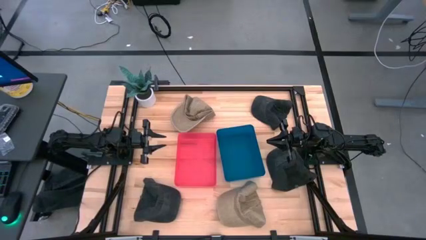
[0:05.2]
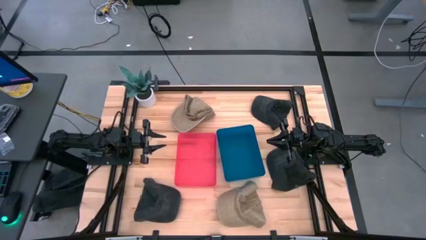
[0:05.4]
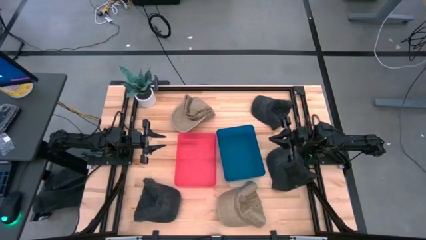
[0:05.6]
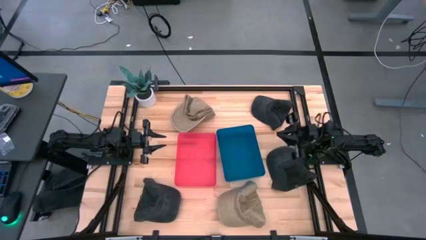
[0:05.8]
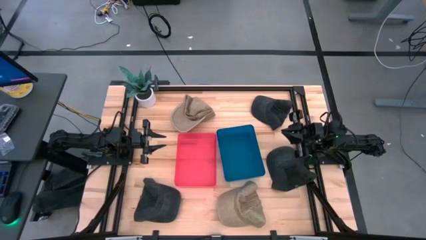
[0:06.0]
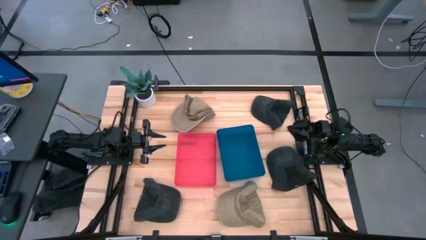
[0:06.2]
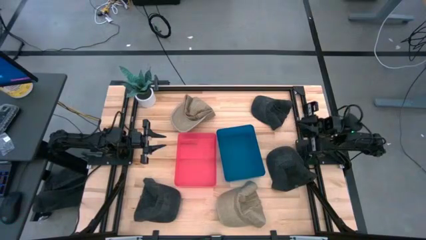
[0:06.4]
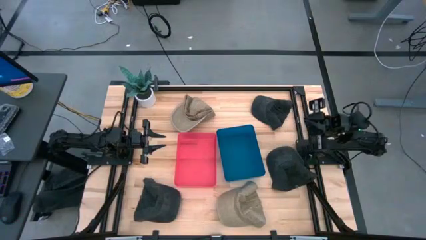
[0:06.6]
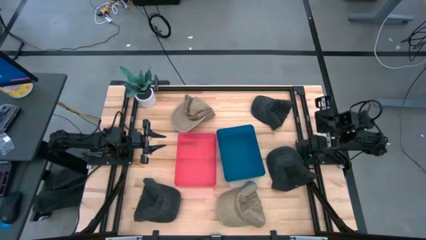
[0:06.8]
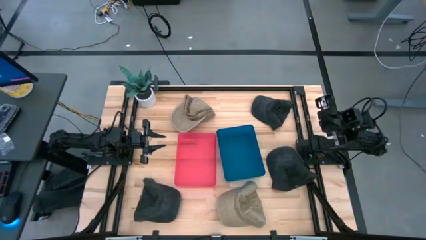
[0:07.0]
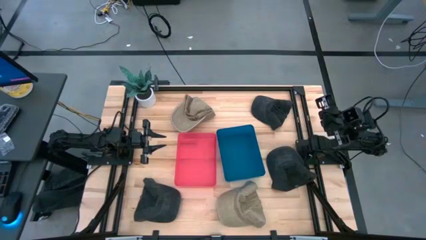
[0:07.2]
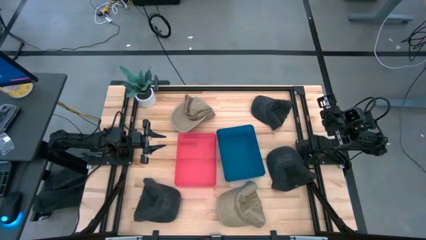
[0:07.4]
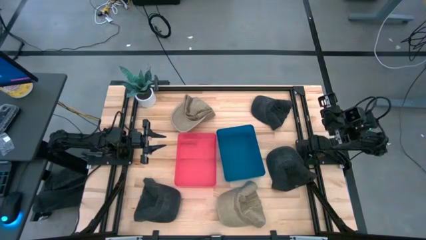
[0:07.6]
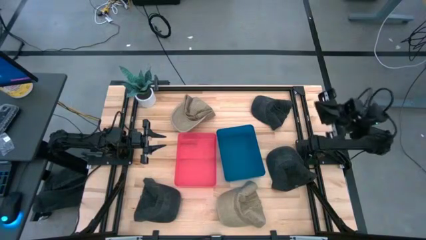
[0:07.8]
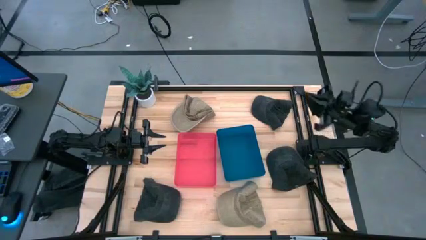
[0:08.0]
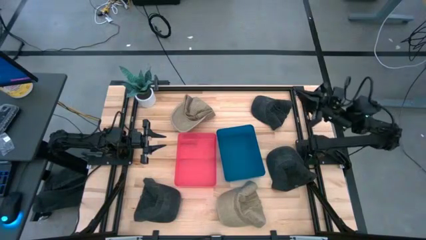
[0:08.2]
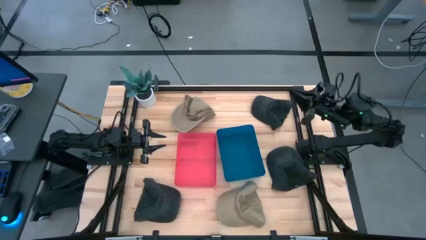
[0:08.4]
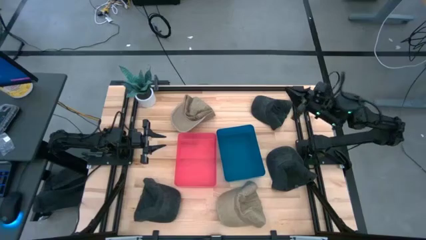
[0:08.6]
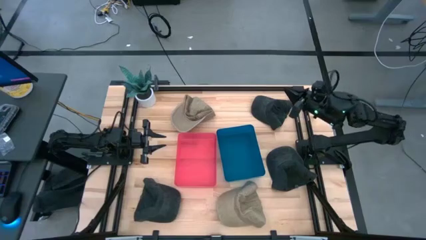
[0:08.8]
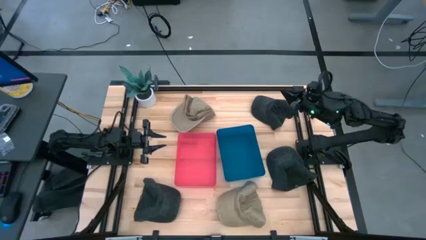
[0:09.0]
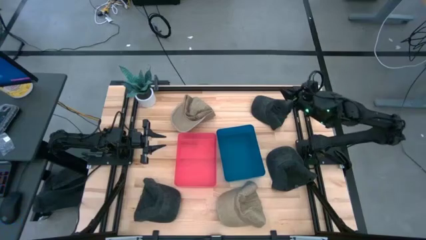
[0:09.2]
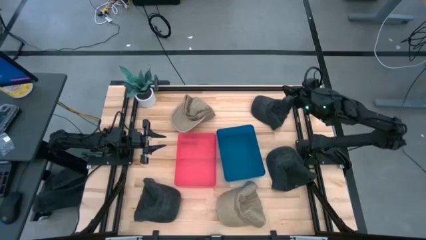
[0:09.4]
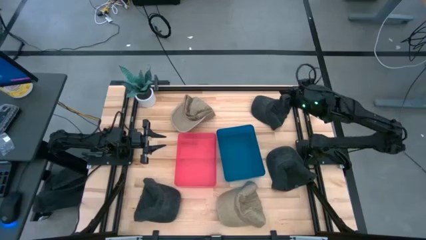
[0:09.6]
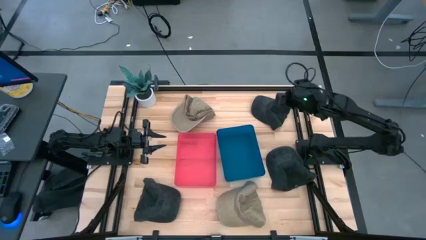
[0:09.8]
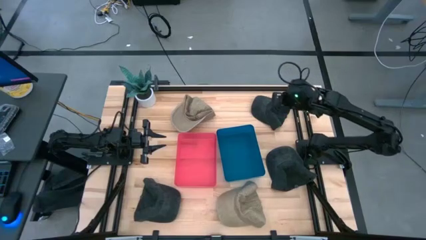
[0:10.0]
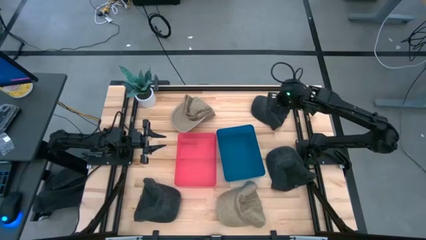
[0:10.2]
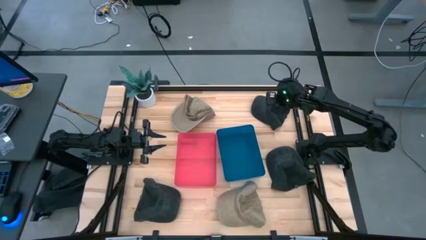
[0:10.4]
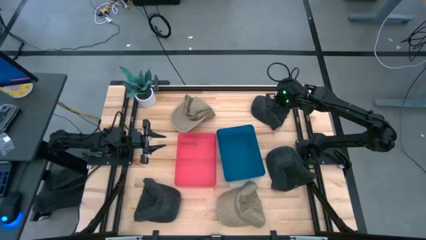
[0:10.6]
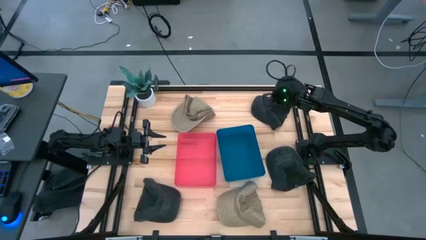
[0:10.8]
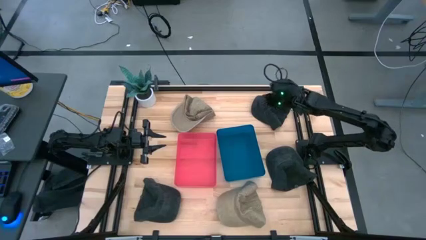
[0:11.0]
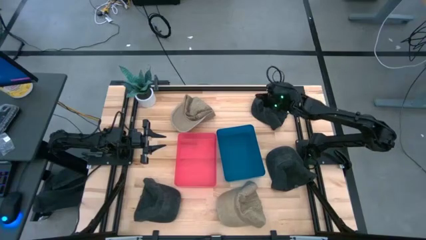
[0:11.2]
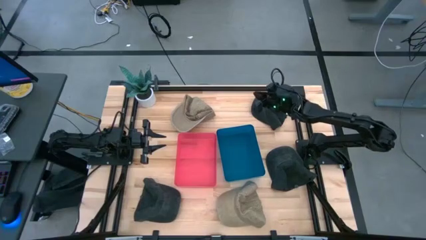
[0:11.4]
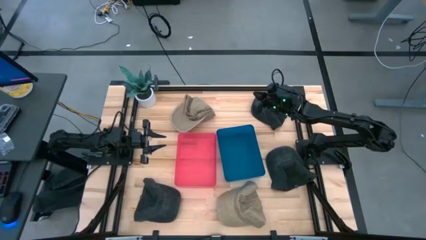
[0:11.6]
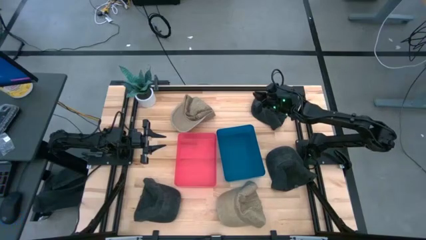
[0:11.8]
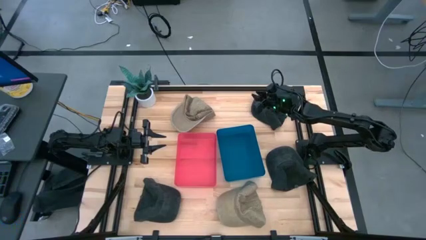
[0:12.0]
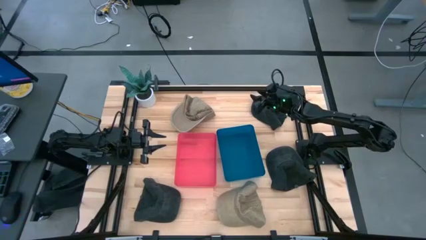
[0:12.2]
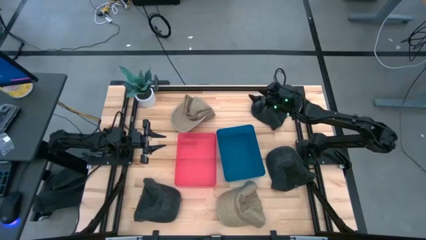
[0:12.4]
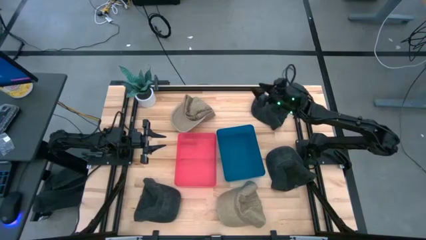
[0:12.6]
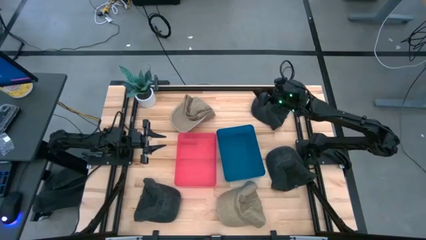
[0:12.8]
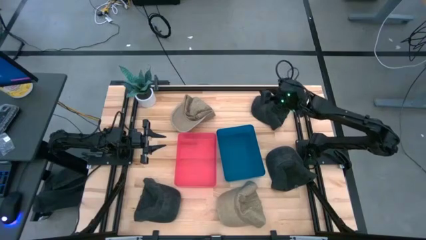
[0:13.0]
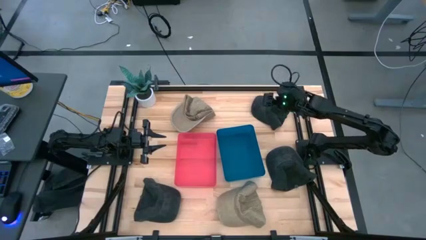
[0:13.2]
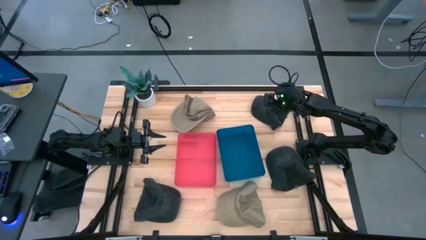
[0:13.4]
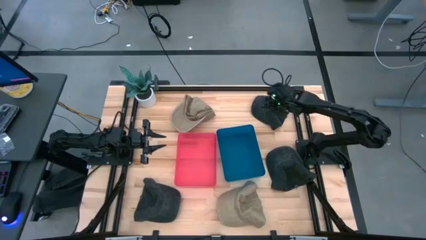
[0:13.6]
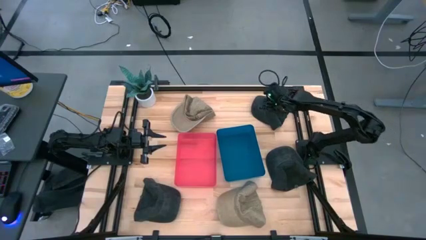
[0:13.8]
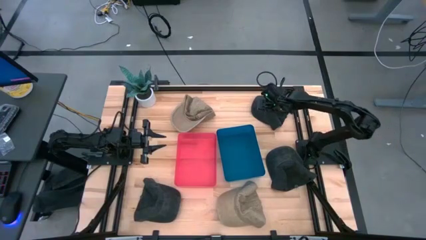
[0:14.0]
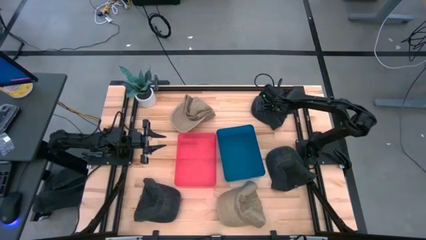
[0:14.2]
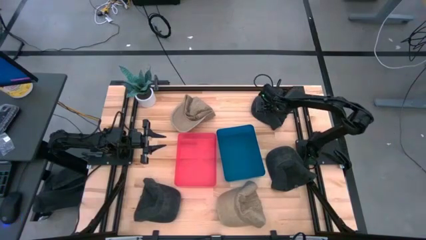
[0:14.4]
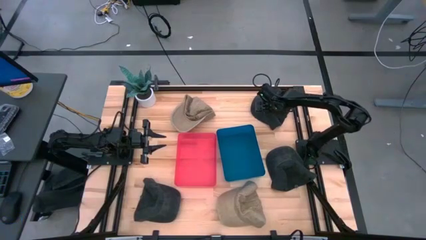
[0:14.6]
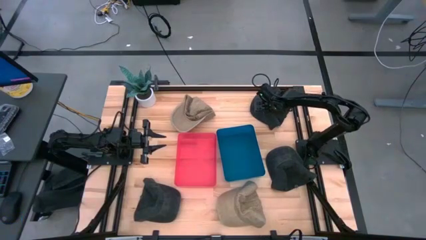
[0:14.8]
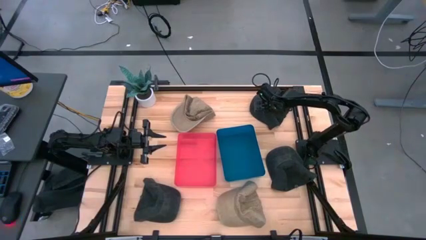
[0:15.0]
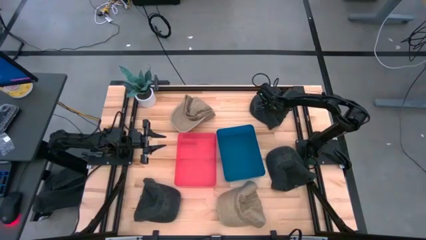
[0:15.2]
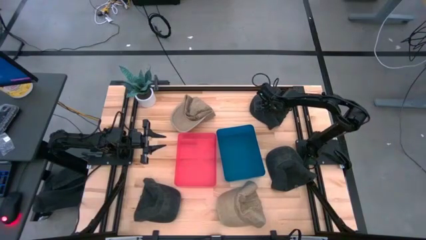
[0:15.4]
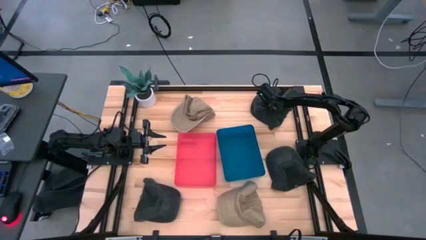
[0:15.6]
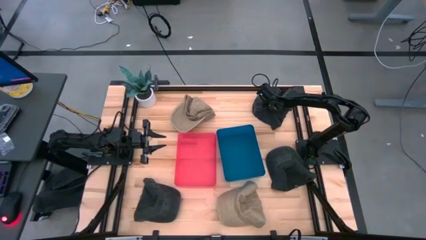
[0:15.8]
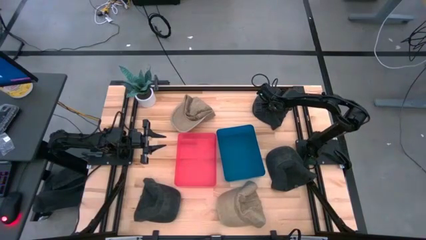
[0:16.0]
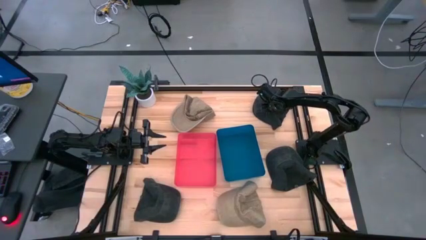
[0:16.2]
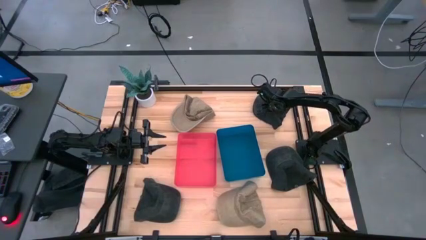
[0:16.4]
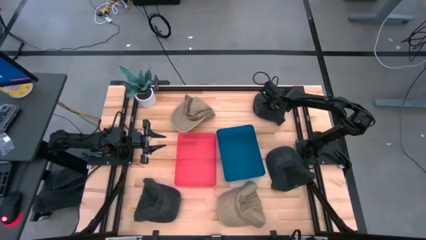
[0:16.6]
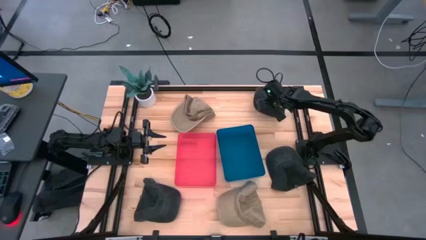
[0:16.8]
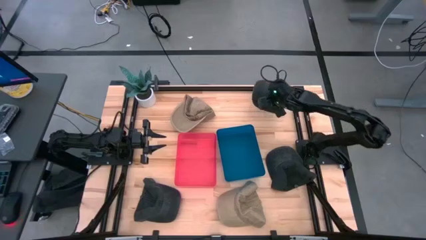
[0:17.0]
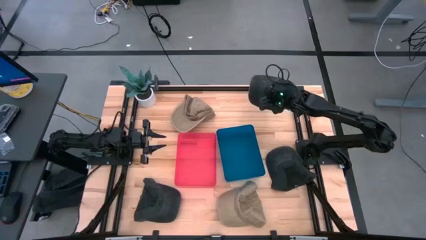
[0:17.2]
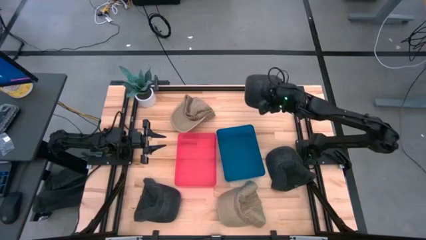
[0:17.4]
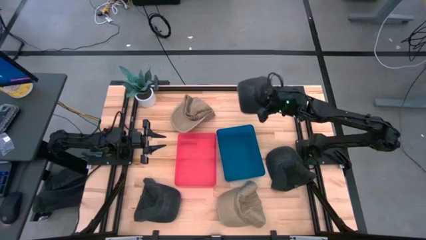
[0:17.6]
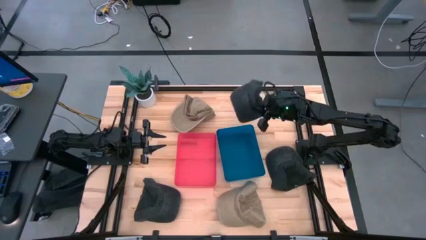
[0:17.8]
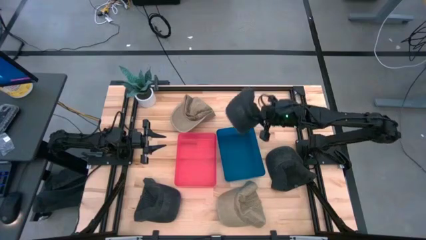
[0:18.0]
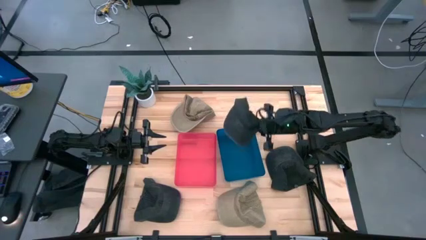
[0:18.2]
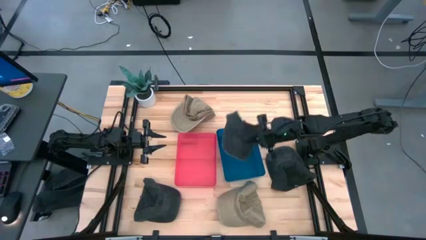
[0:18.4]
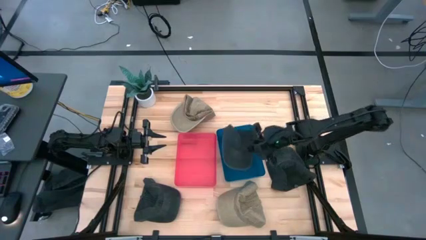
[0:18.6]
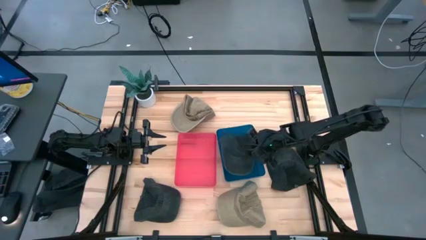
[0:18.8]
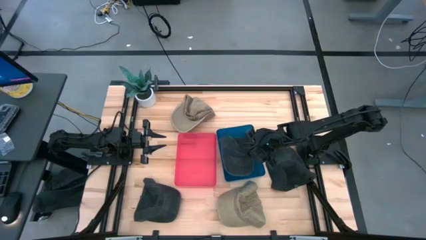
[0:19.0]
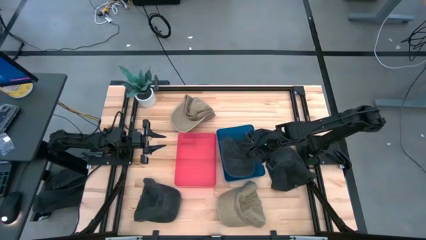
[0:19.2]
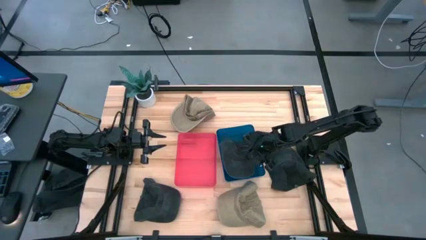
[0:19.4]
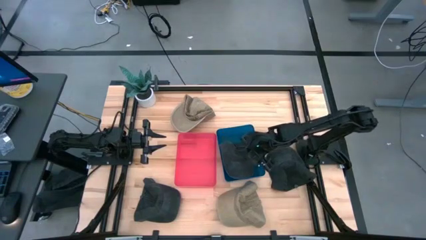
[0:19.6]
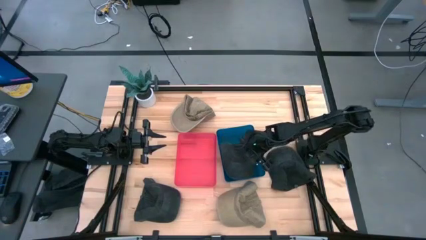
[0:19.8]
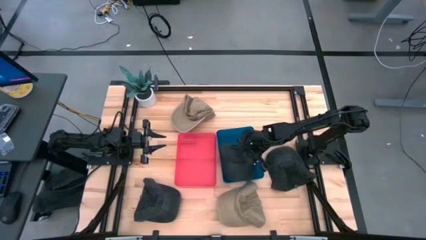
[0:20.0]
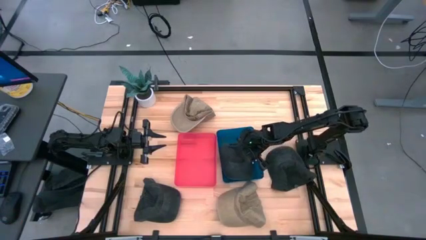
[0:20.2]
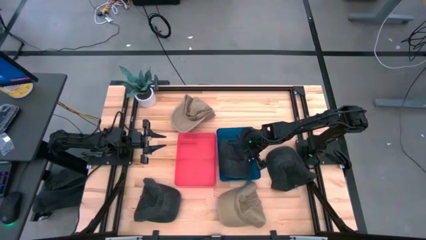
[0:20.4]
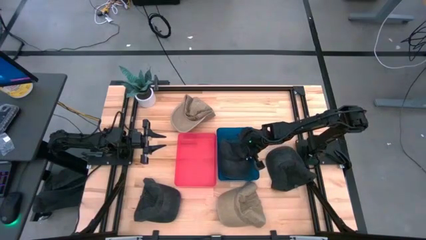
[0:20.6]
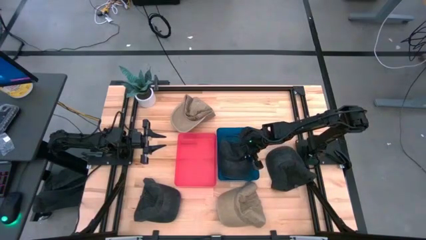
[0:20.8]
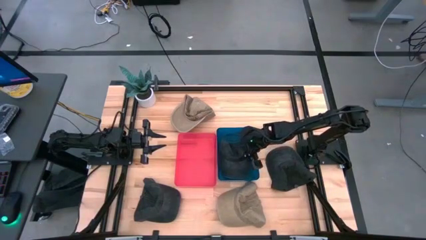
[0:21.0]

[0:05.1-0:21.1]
Task: Pick & Place hat
Put the top black cap into the blue bin
